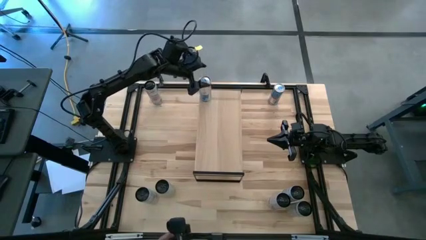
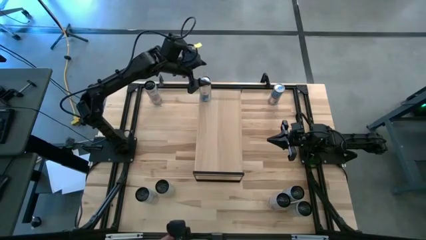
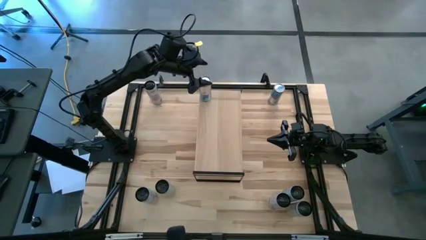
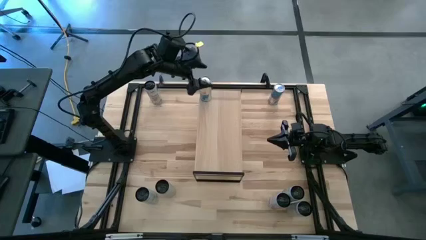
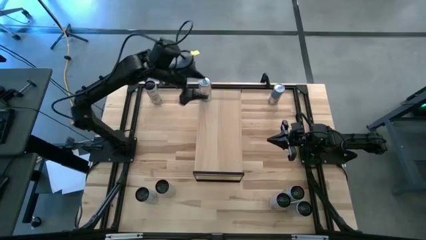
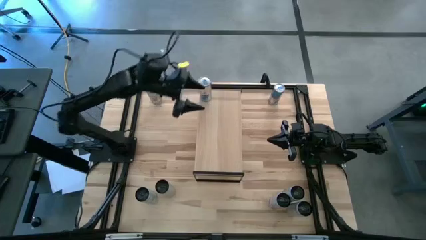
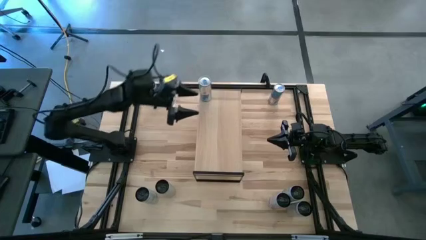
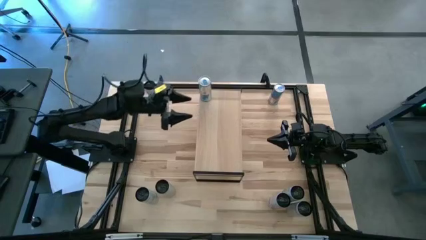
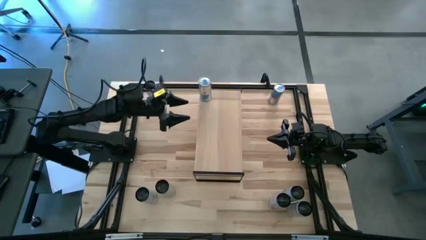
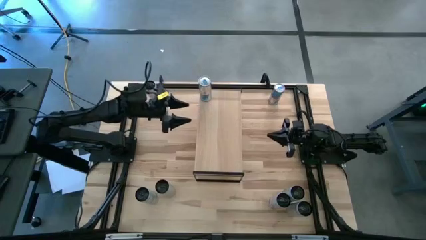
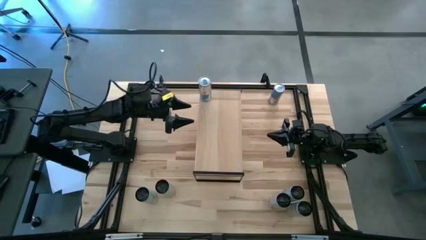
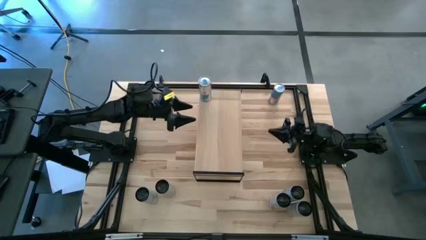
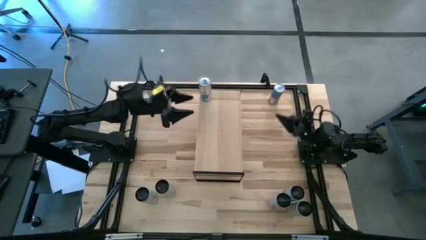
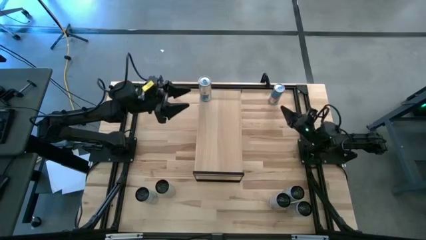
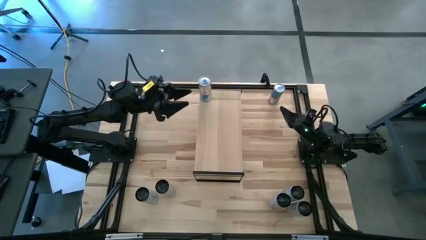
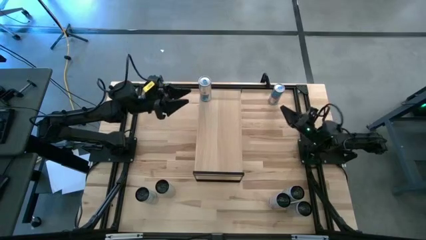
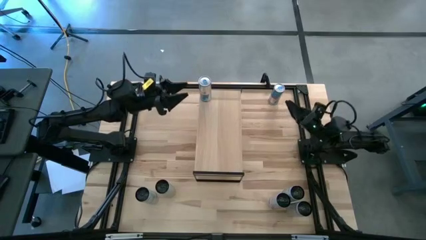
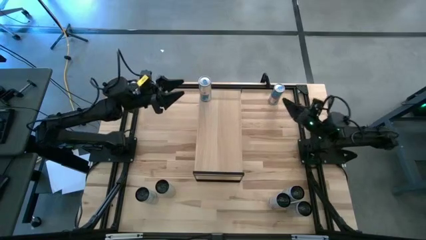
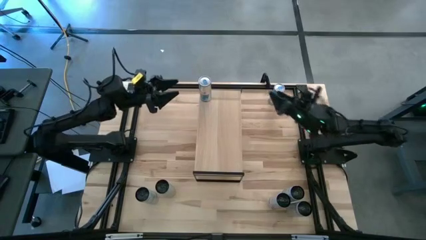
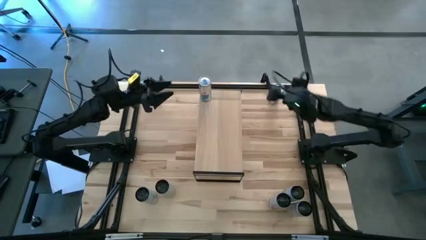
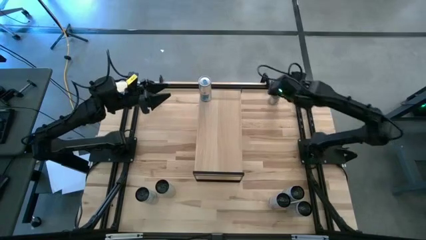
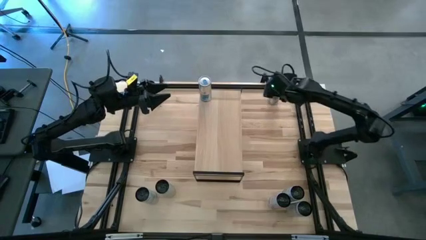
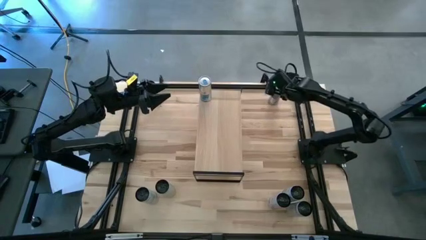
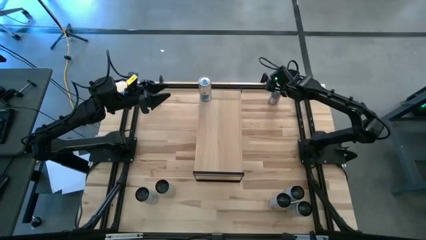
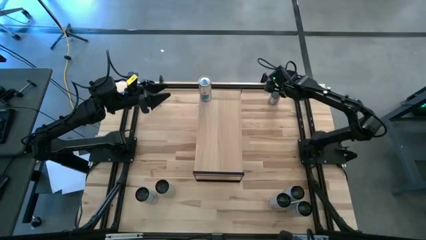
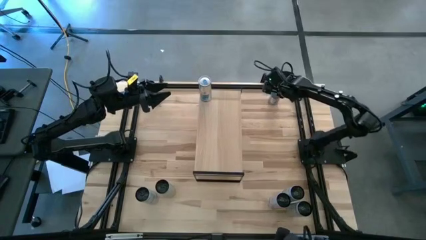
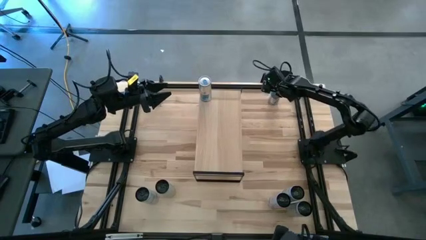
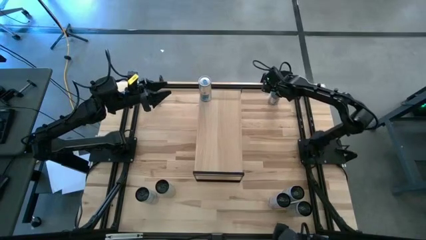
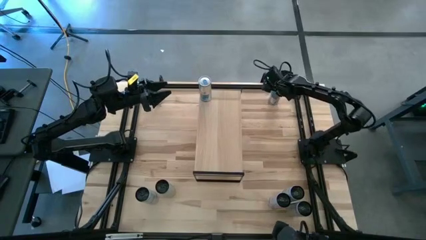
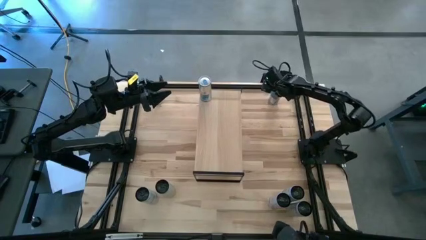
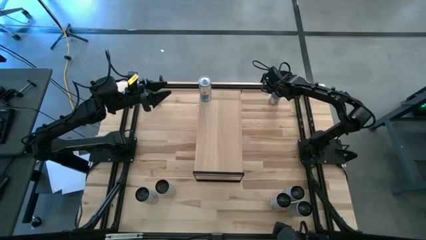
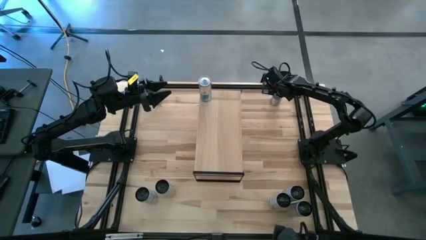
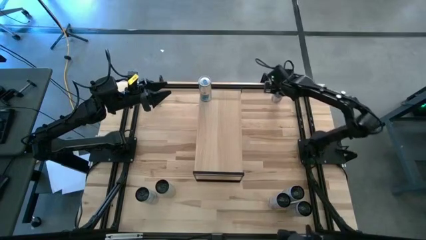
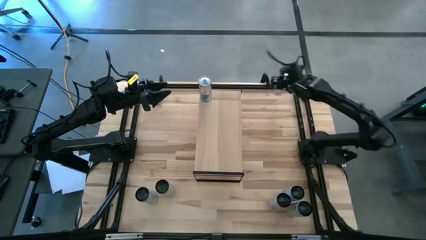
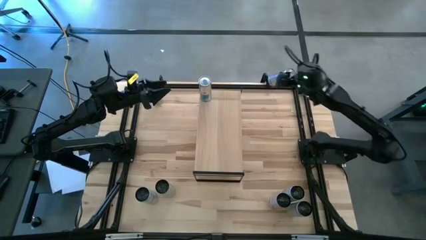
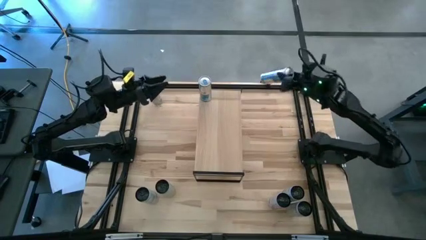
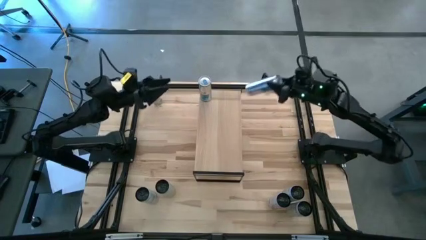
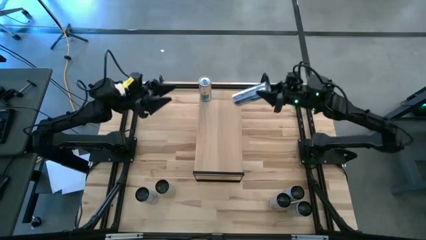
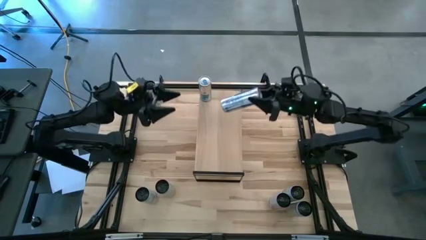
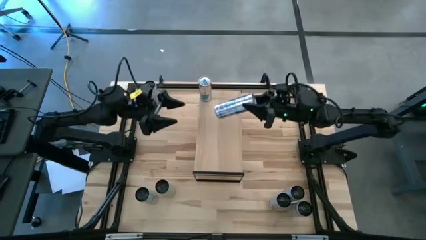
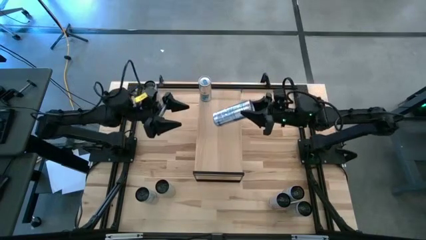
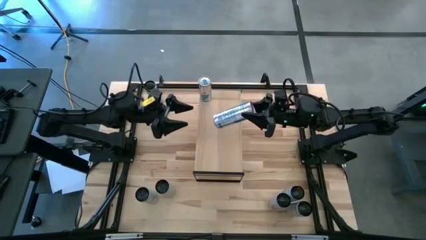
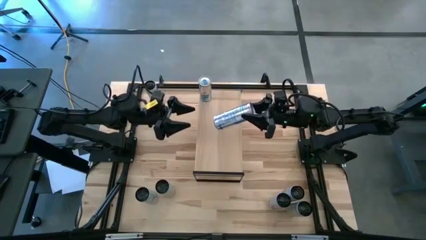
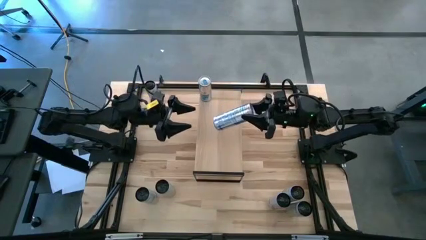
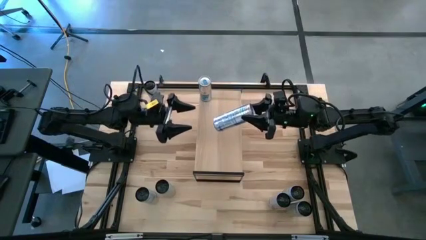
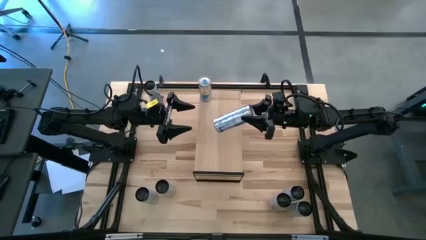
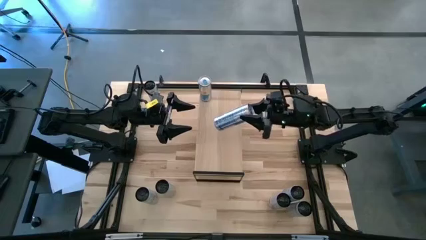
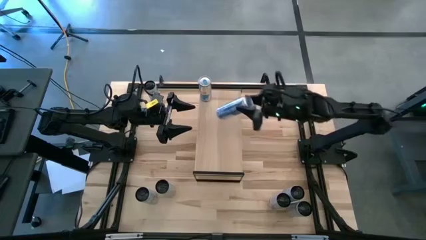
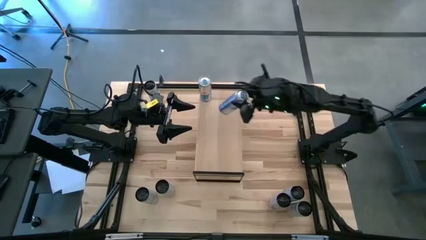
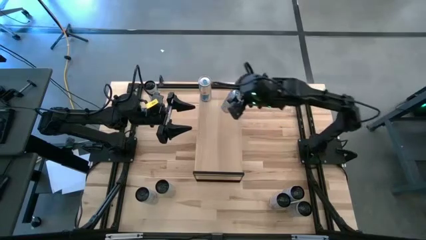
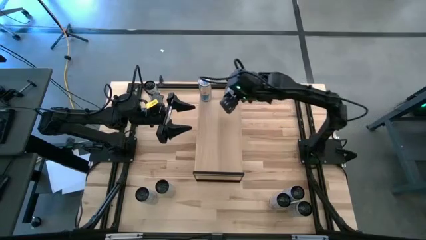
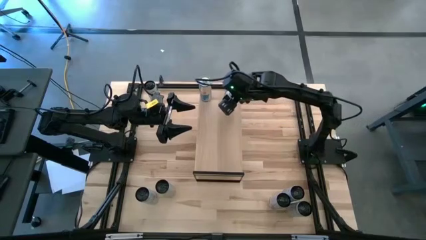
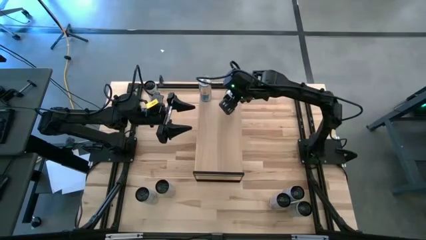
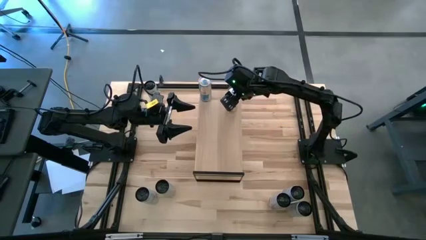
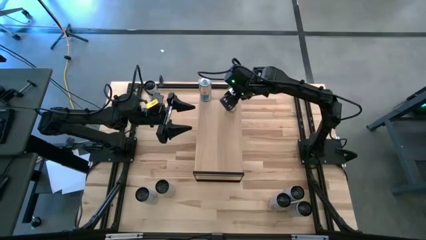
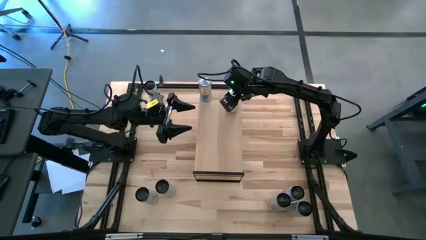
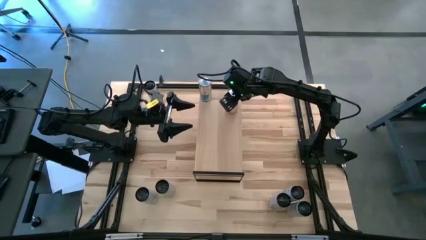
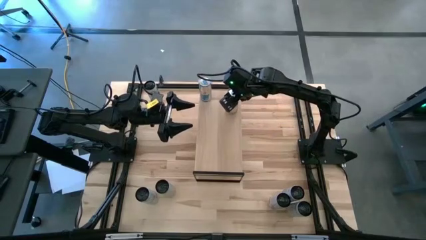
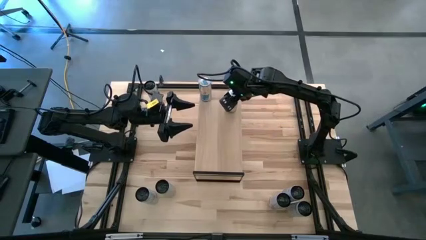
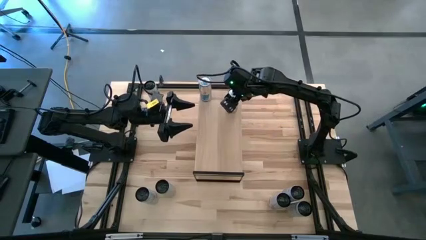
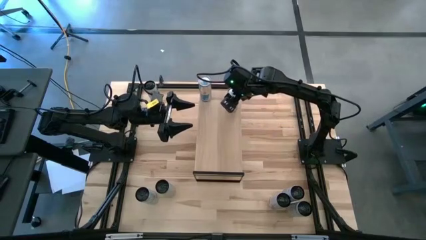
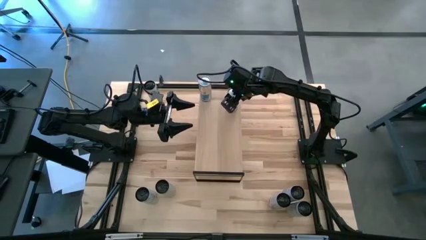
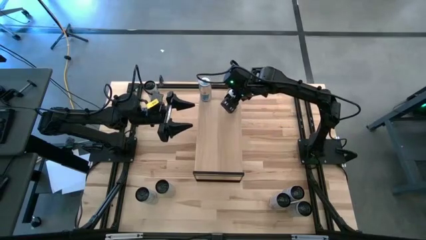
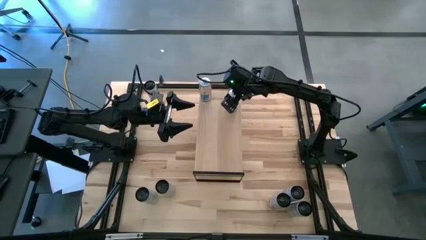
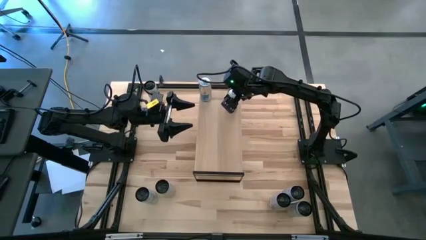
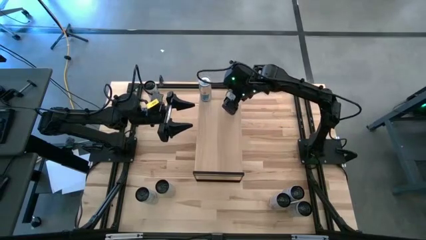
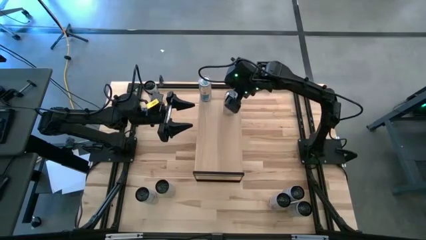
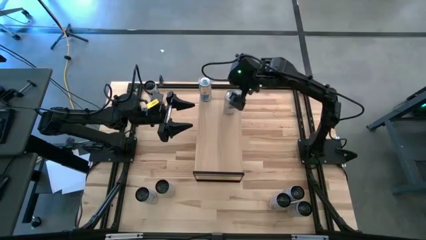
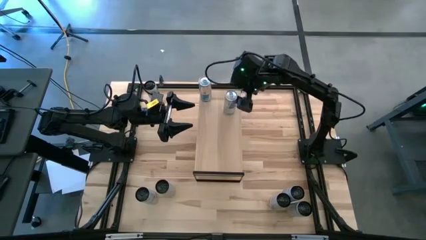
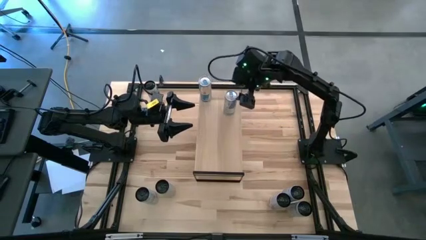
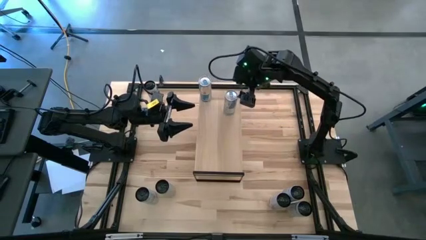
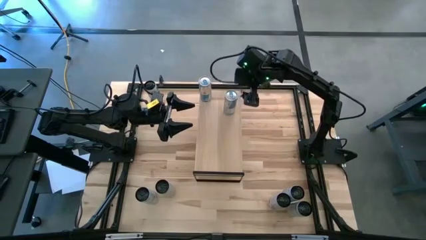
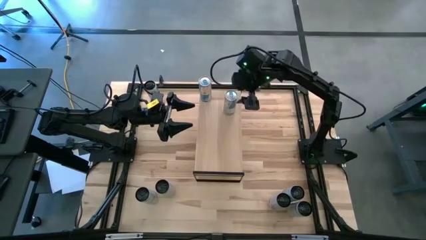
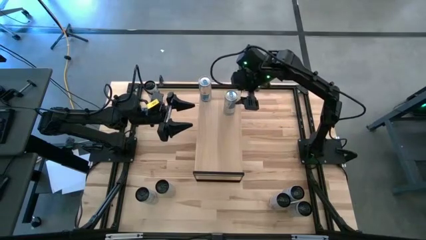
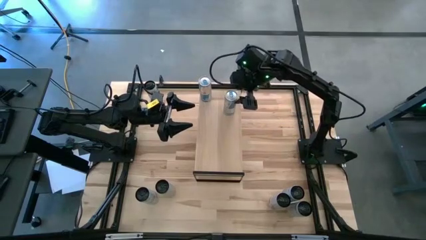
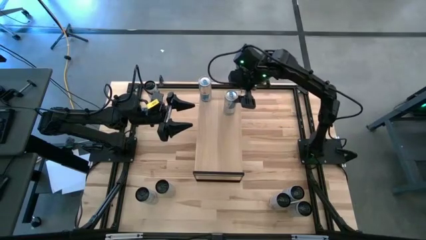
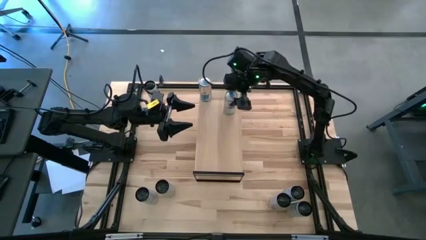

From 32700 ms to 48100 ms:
Task: Place canned beverage on shelf
Put the blue soda can on the shelf aligned with the other blue soda can
